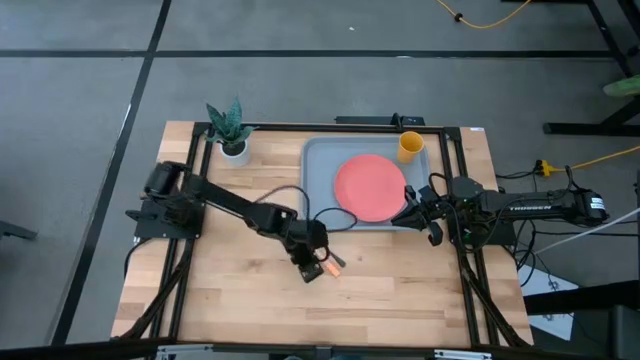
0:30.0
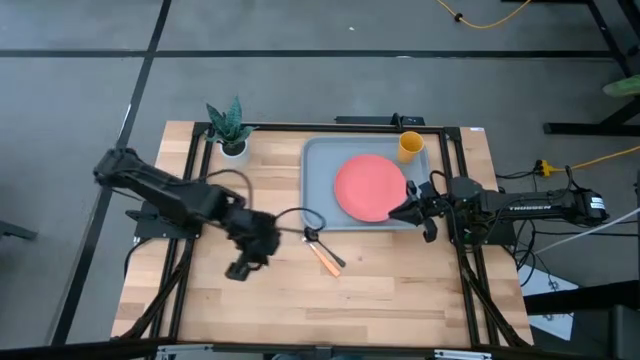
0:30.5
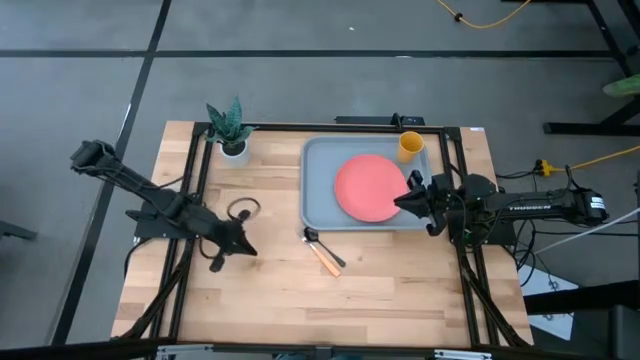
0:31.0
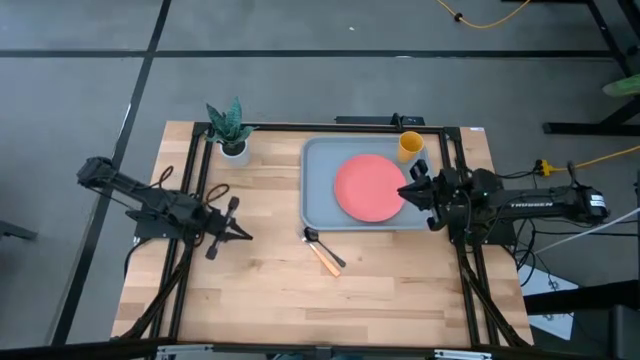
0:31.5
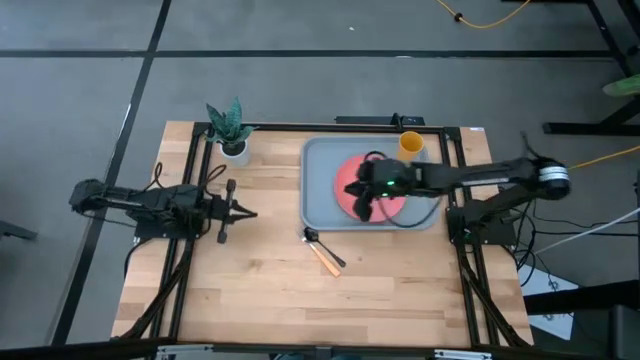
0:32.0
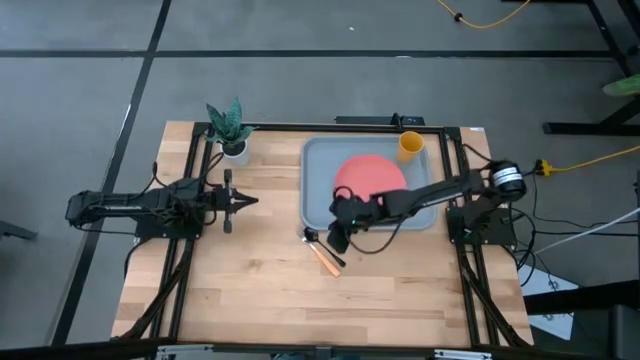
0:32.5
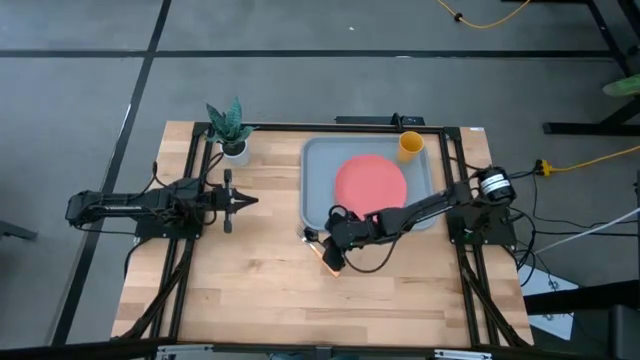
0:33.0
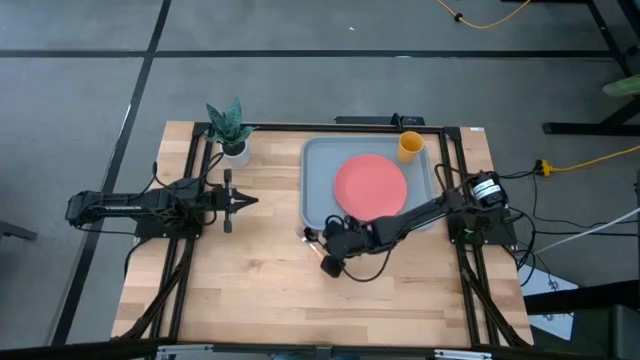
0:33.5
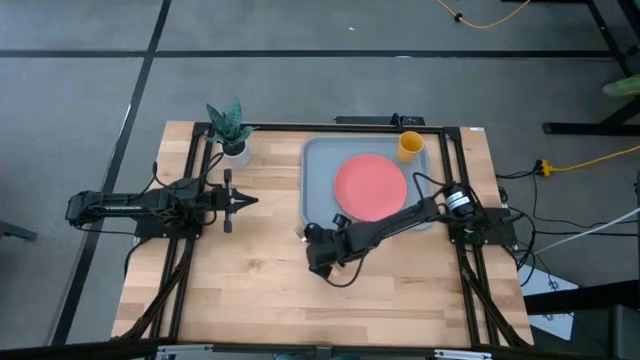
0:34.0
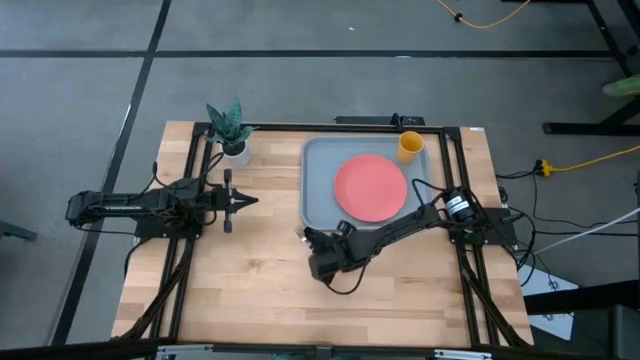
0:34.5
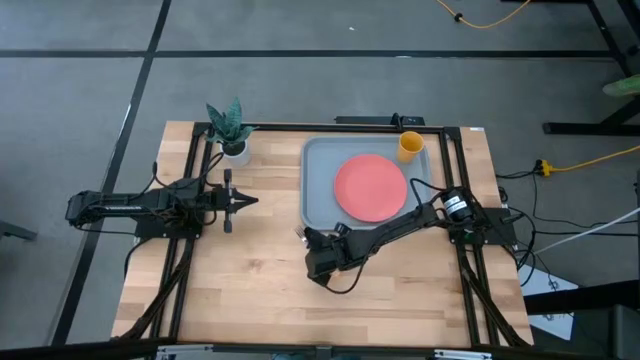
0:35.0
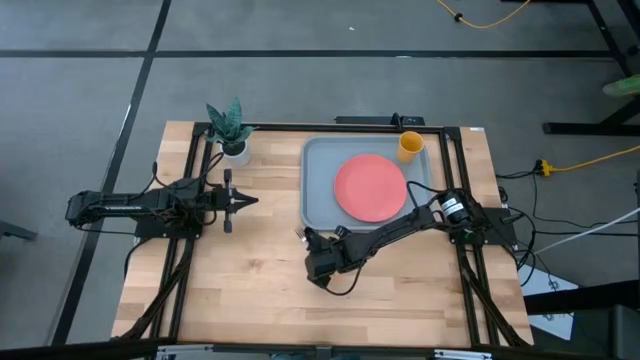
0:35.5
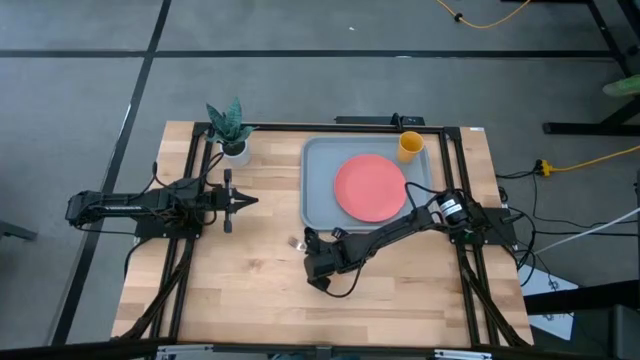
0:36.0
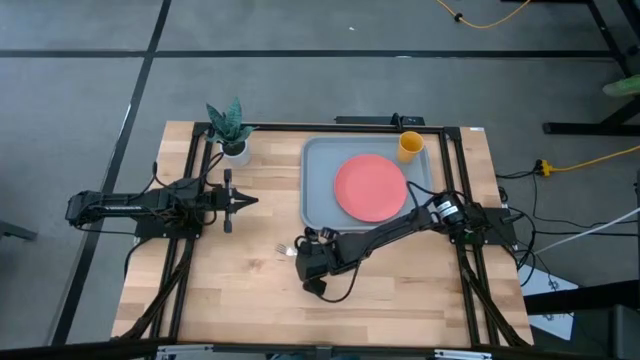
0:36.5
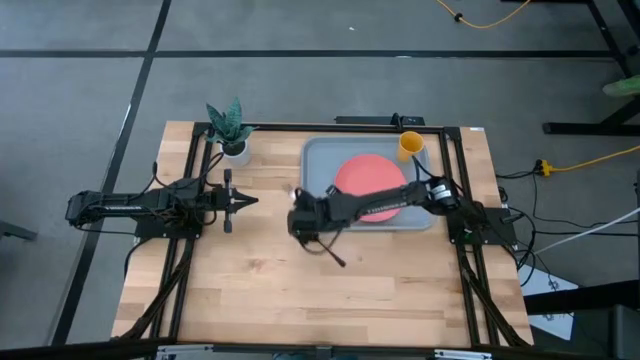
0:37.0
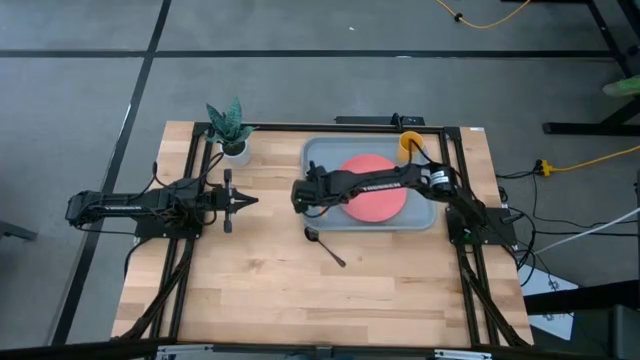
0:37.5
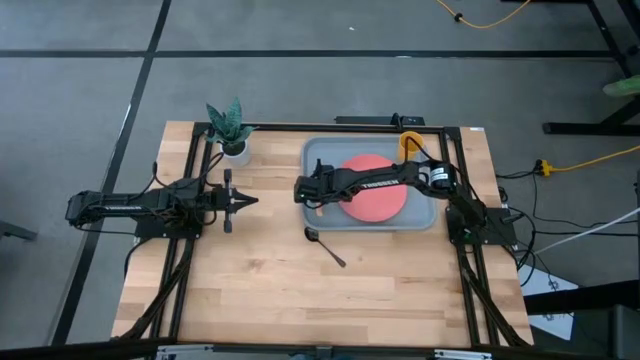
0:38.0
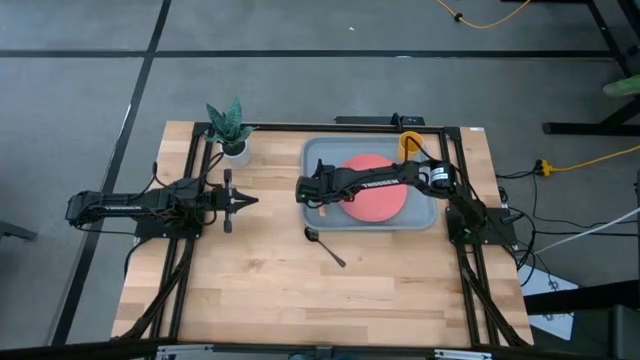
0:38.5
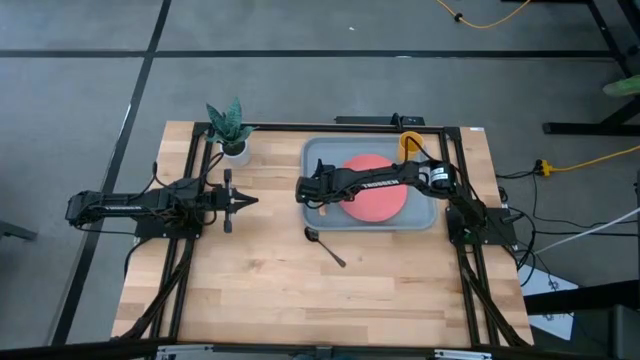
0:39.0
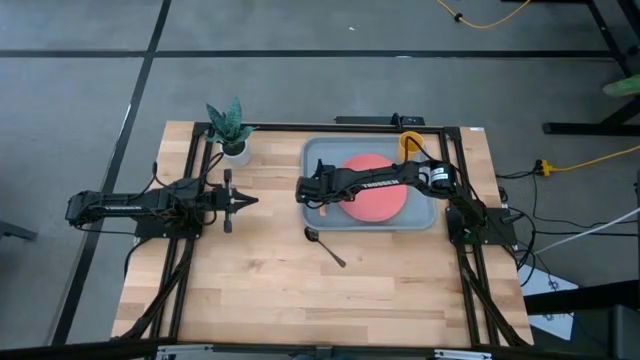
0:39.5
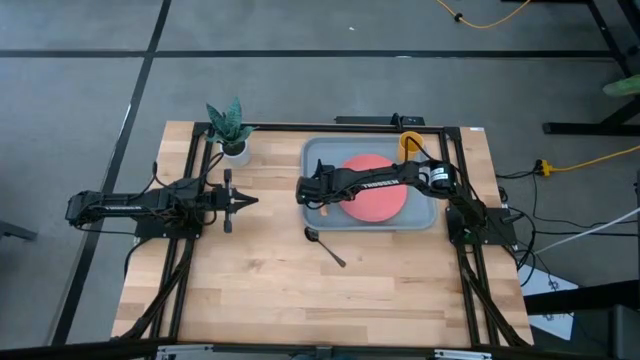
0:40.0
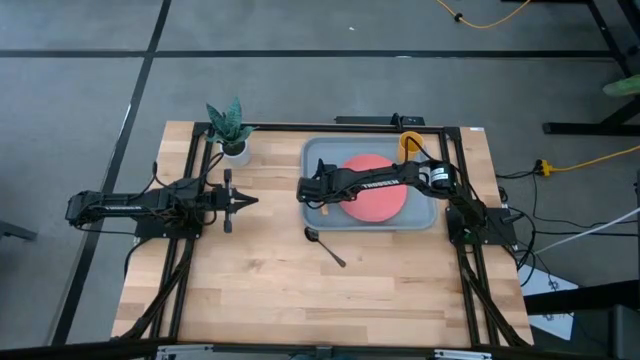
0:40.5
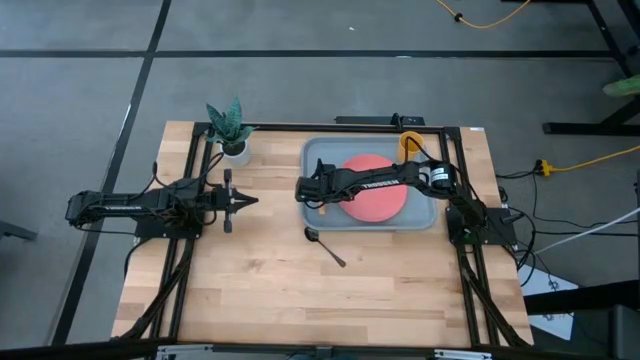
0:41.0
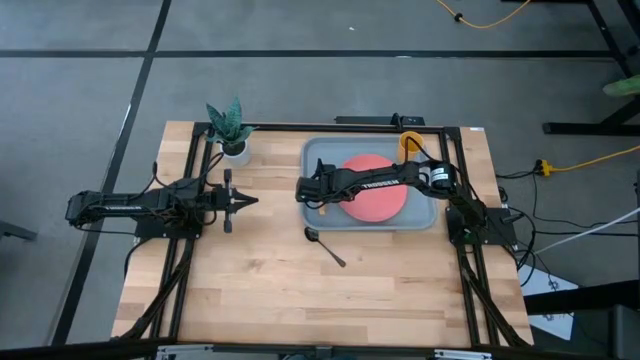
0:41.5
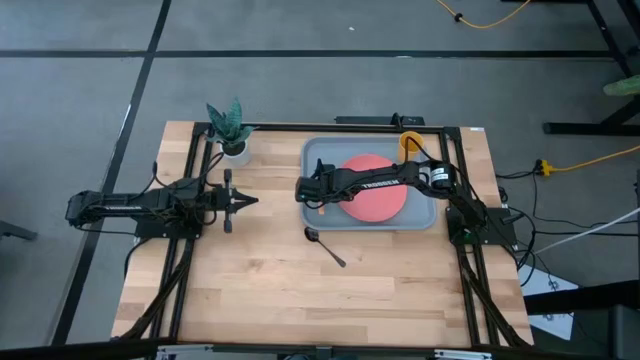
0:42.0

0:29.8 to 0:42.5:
Task: Pick and place plate/cup/fork/spoon on tray
Put the orange fork on the gray serving tray to the left of the pink plate

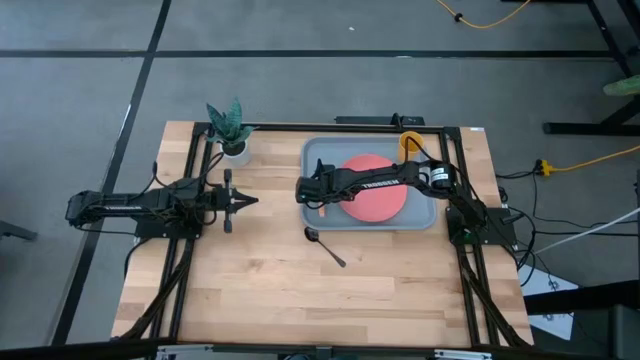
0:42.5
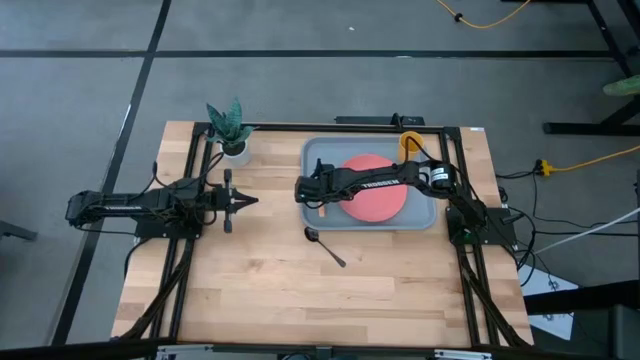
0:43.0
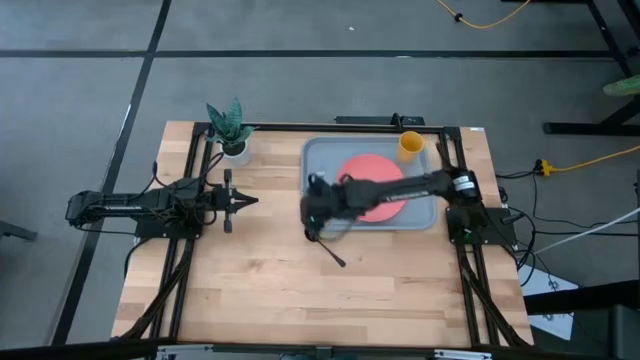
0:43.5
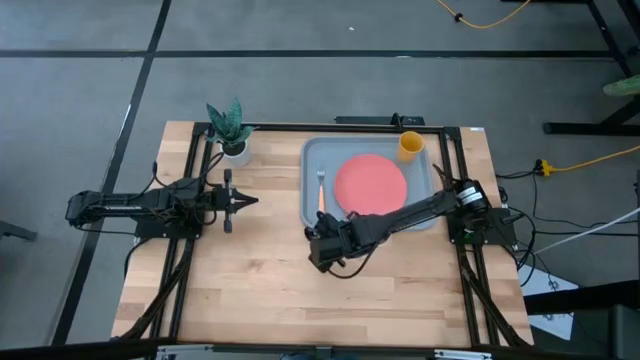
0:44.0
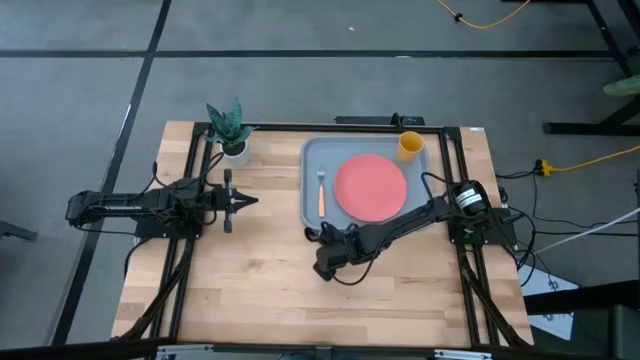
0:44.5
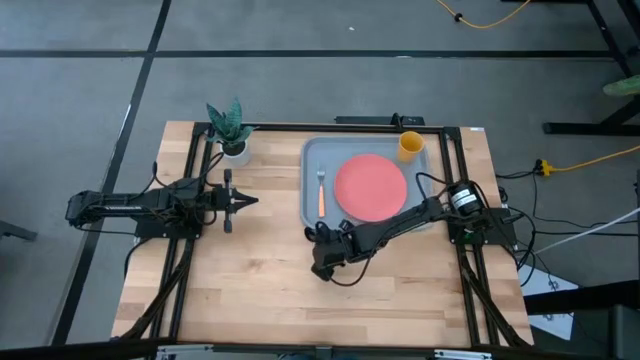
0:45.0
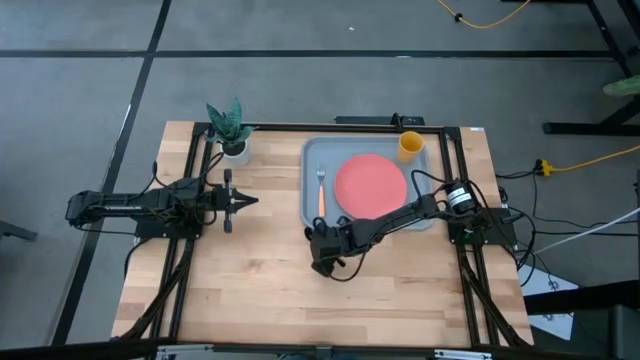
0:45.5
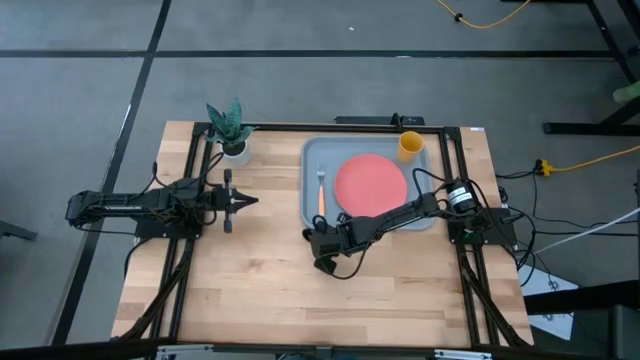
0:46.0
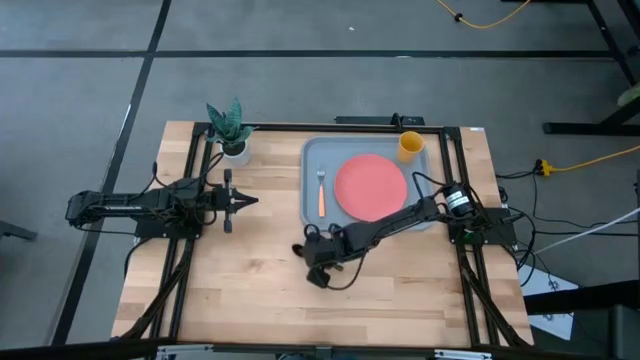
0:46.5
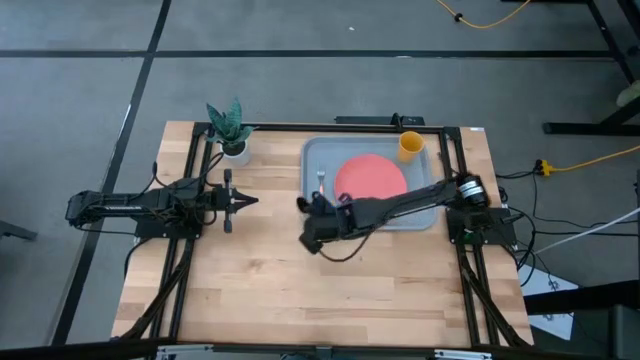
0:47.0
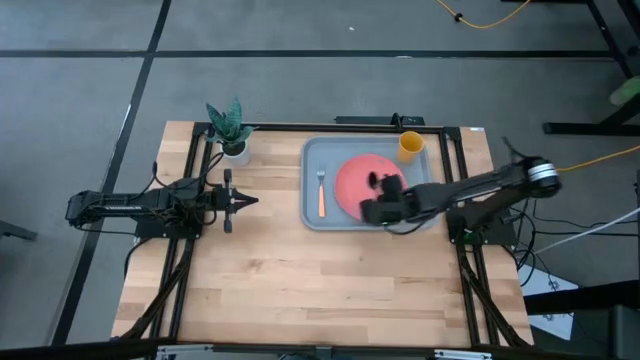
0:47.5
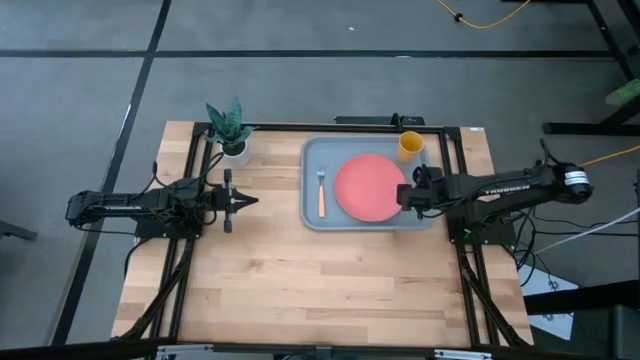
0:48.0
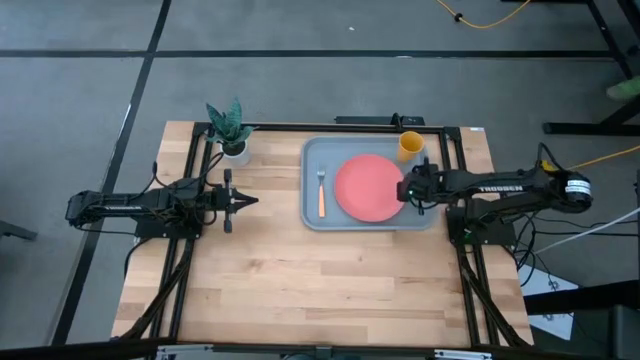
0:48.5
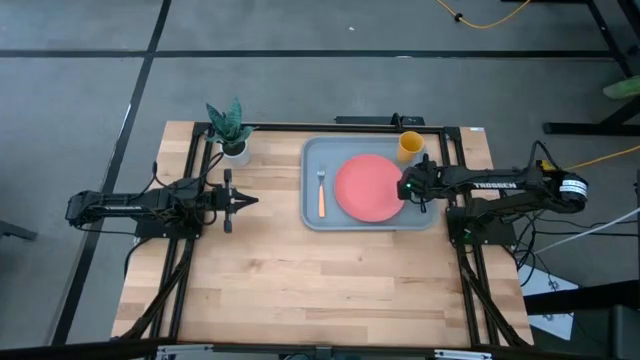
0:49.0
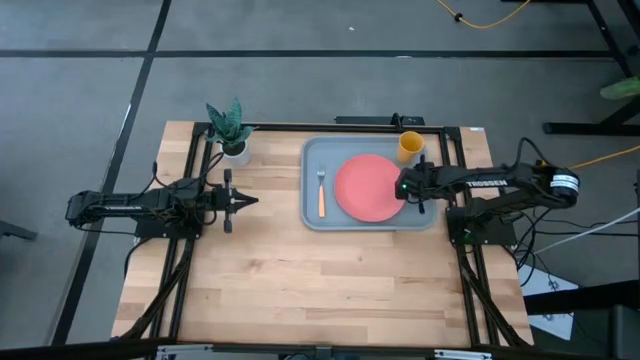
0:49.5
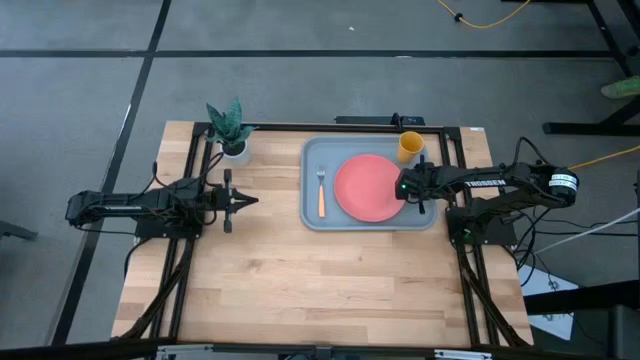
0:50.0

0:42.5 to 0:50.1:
Put the black spoon on the gray serving tray to the right of the pink plate
